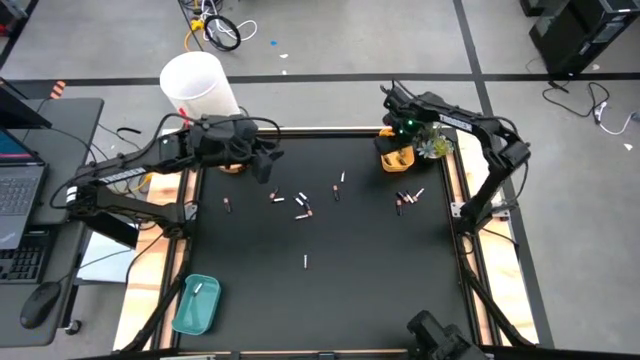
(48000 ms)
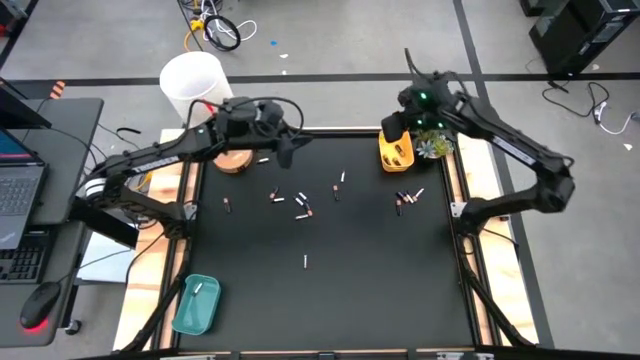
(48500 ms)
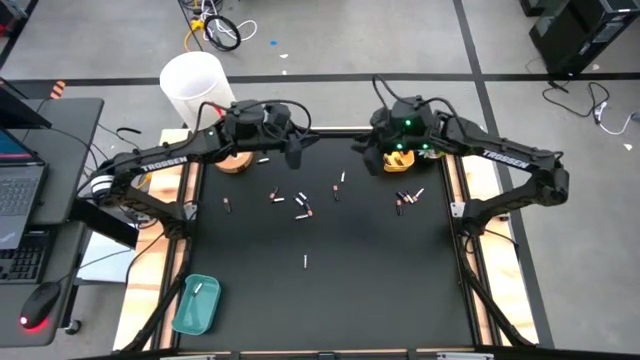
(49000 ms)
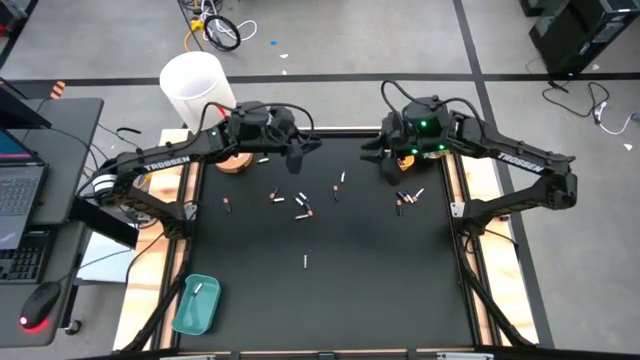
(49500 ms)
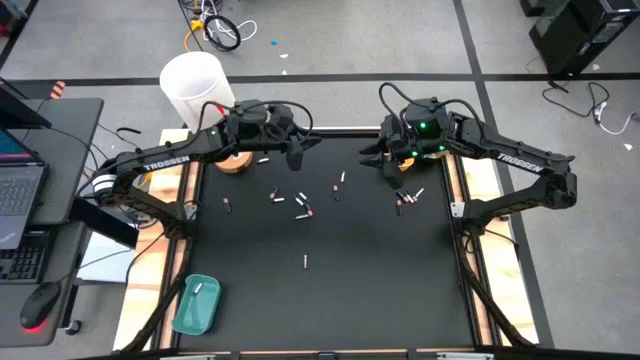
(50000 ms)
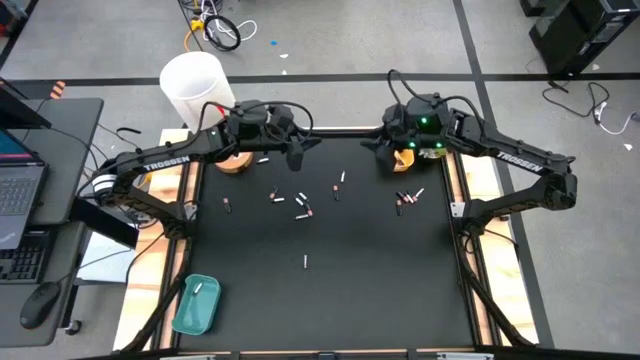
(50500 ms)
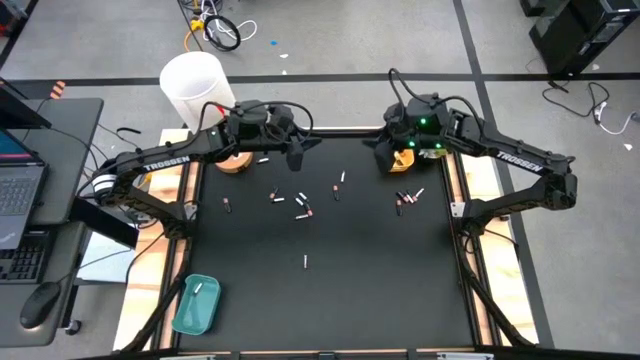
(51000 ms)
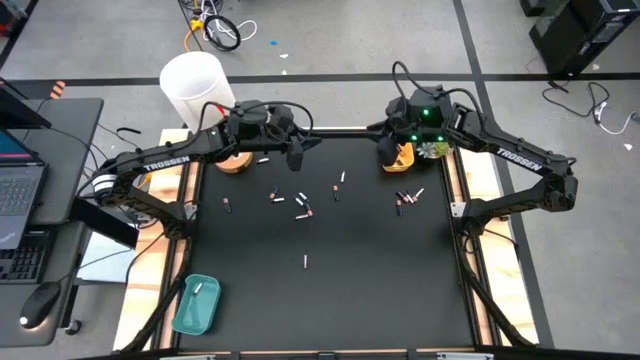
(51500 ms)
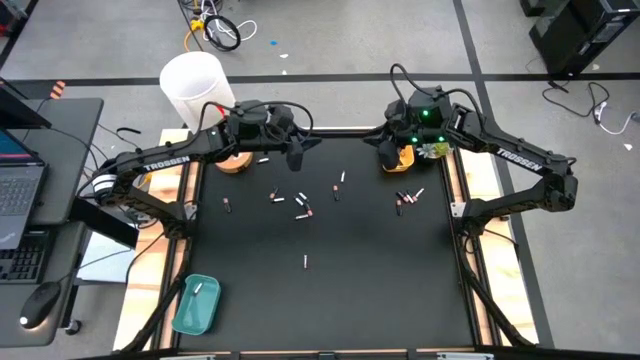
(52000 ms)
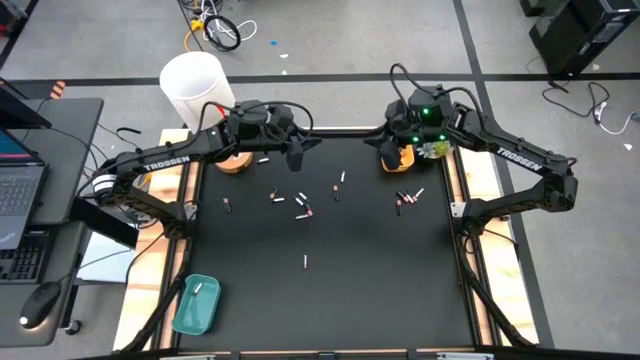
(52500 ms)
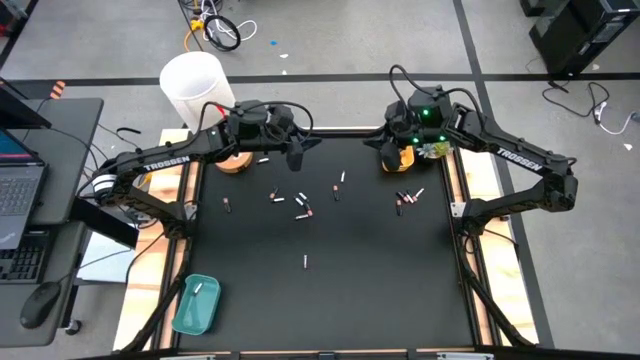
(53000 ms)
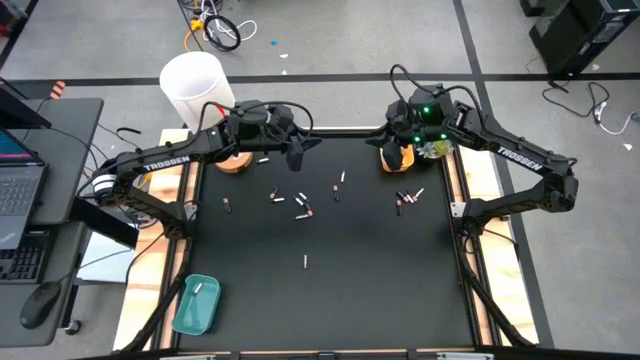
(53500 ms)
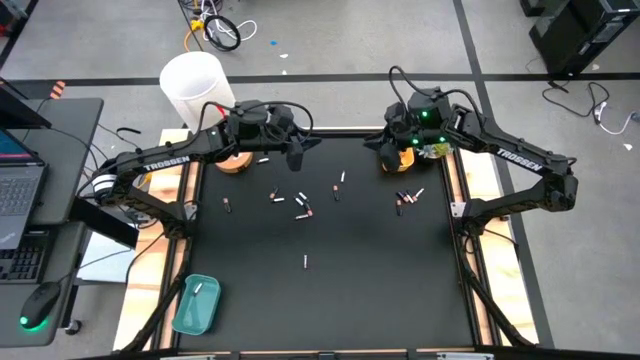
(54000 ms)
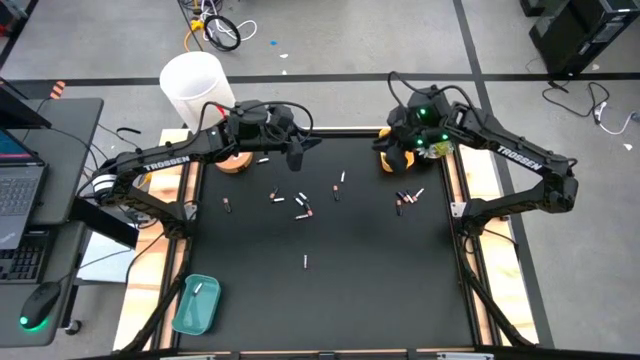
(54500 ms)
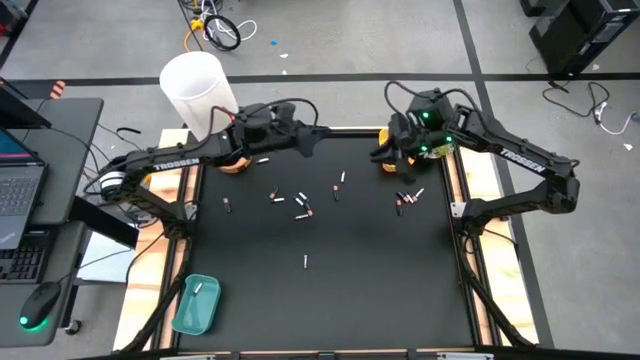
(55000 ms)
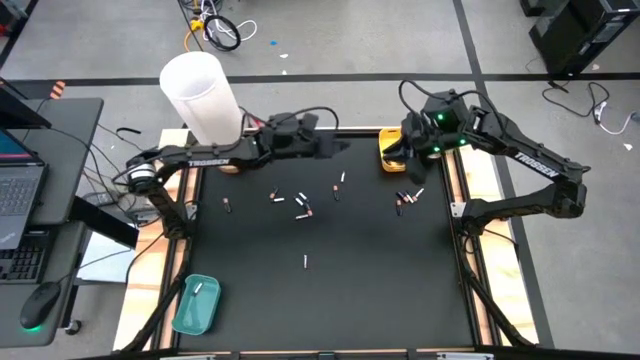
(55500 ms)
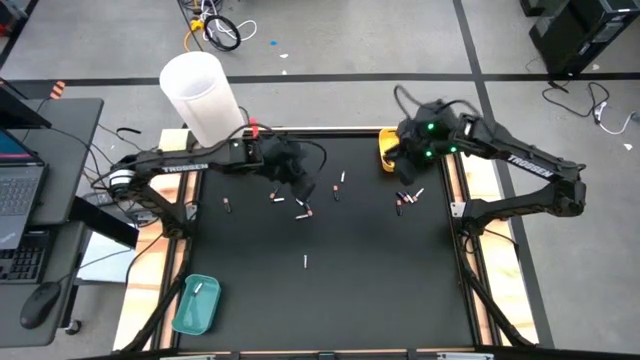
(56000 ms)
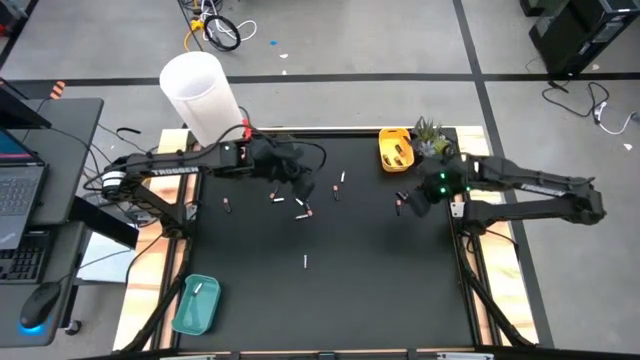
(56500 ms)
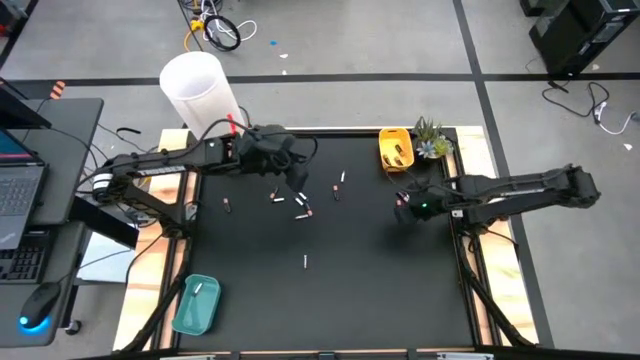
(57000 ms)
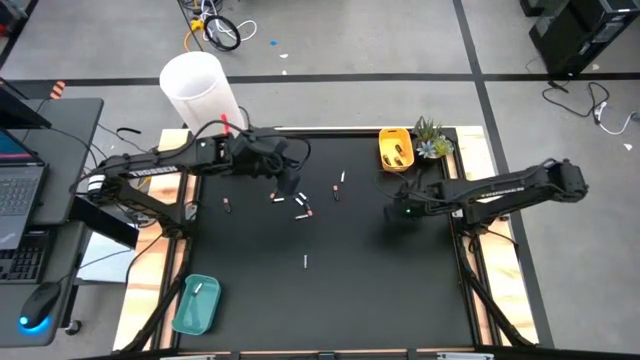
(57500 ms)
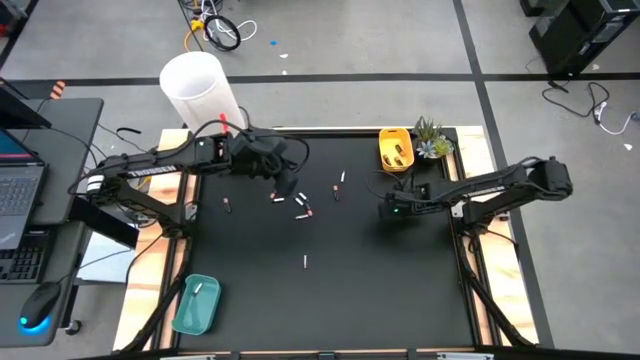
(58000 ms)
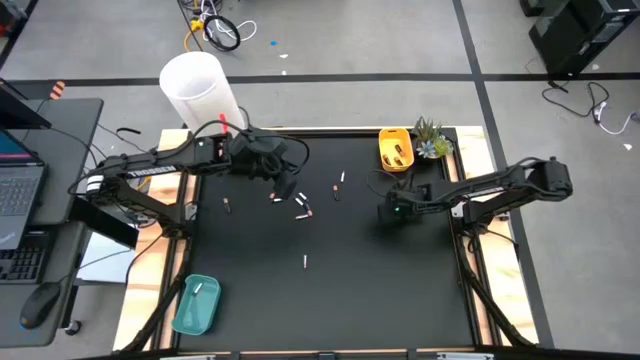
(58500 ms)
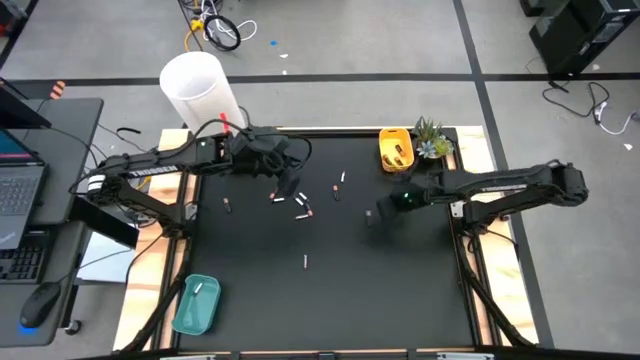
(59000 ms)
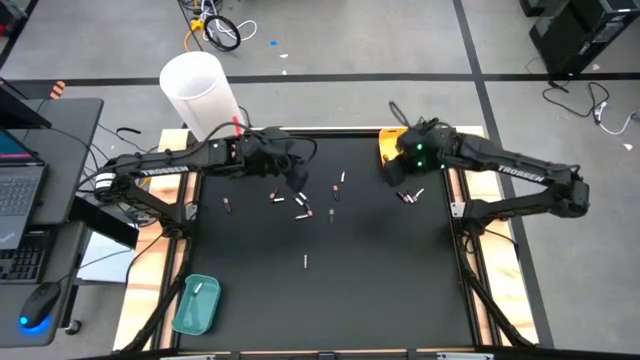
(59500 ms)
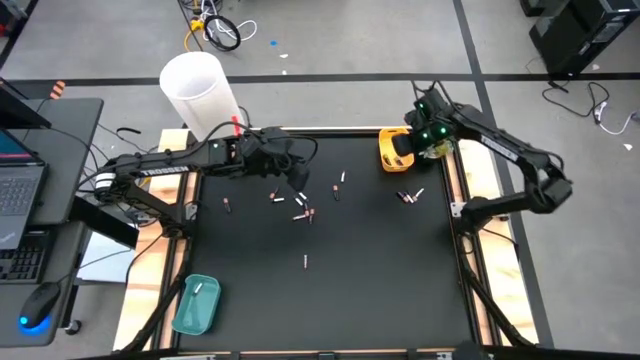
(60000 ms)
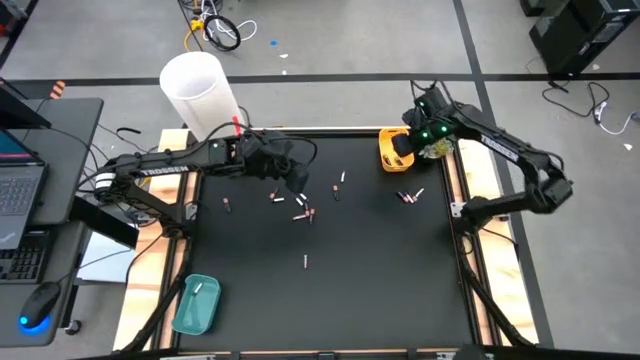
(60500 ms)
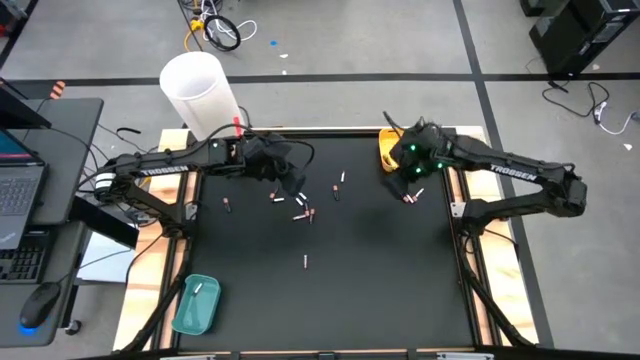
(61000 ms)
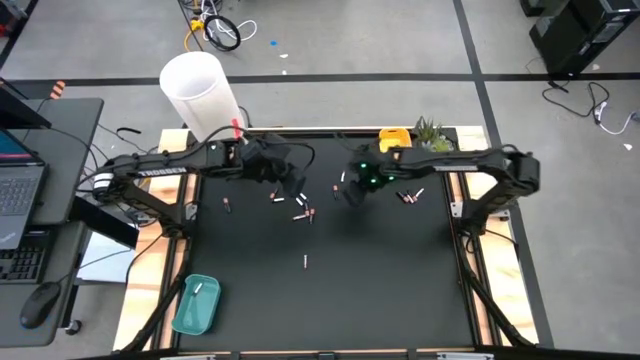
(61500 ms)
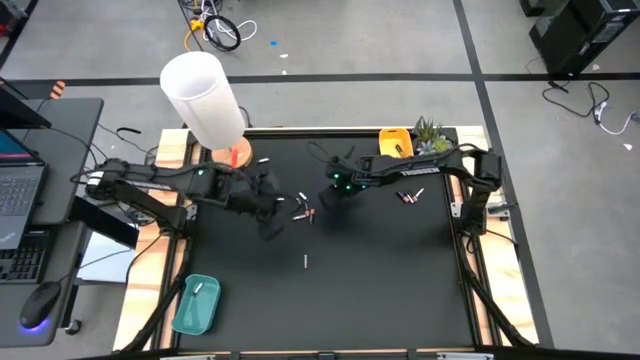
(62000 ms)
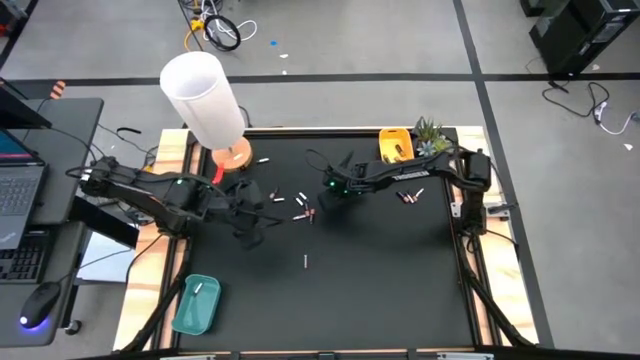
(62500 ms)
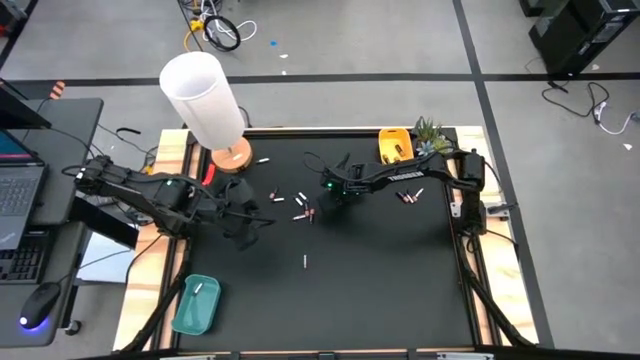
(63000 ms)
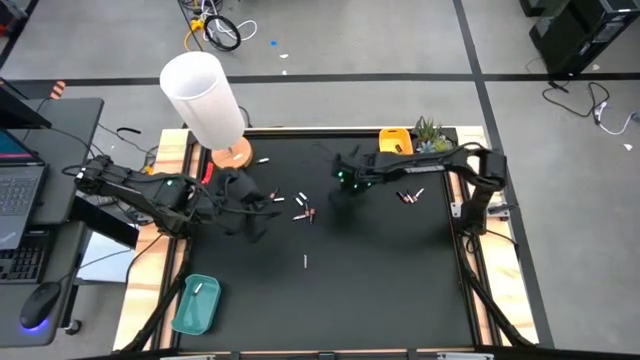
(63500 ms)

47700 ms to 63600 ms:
Task: Sort batteries
Put the black battery into the yellow bin

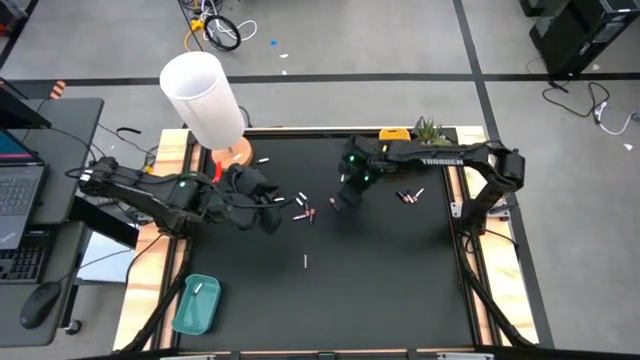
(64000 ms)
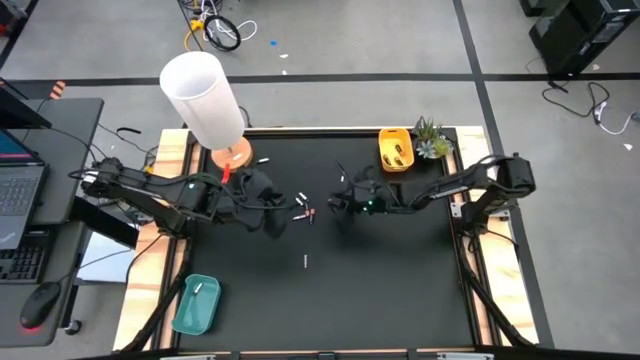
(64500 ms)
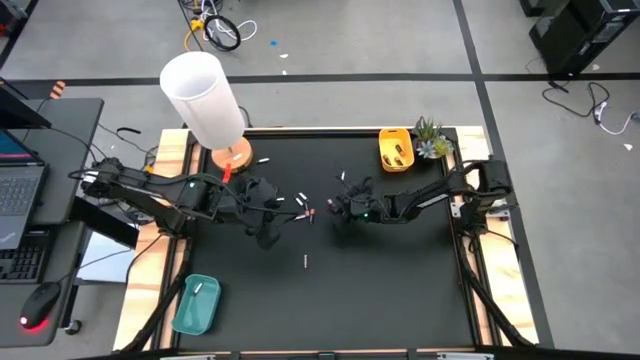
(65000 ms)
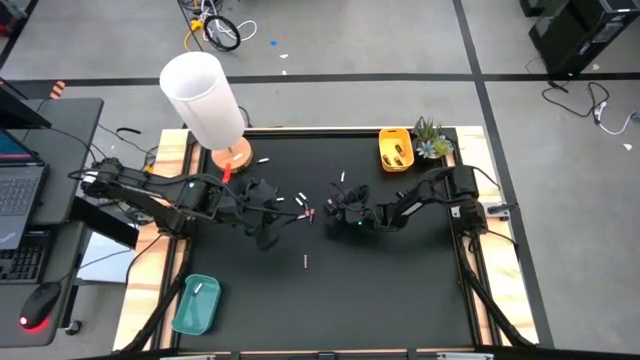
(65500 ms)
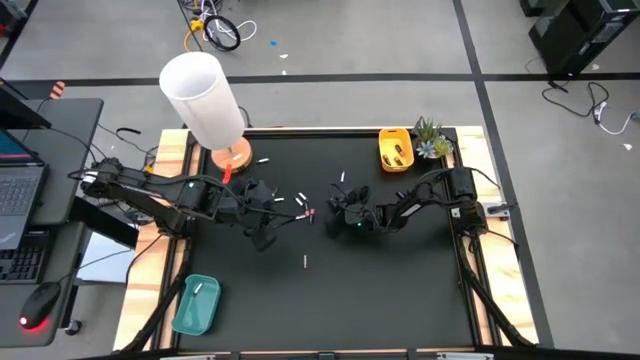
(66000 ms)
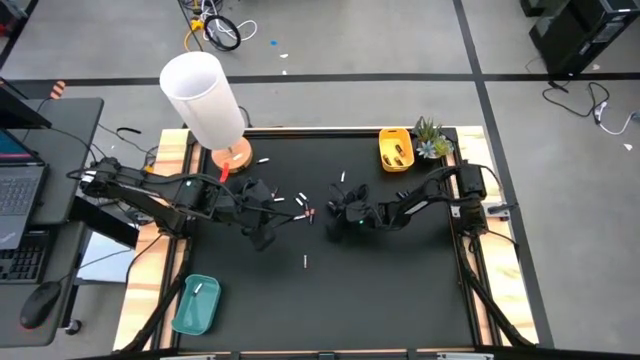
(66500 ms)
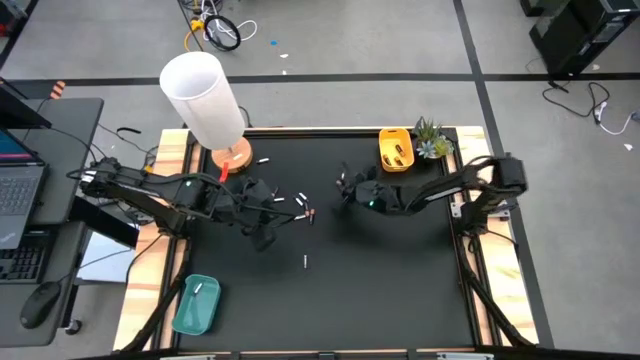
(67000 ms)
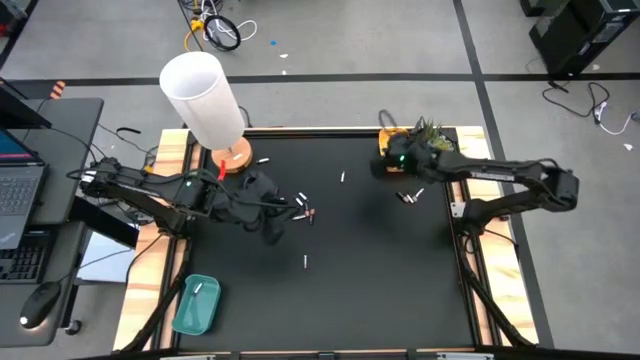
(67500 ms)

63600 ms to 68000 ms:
Put the black battery into the yellow bin

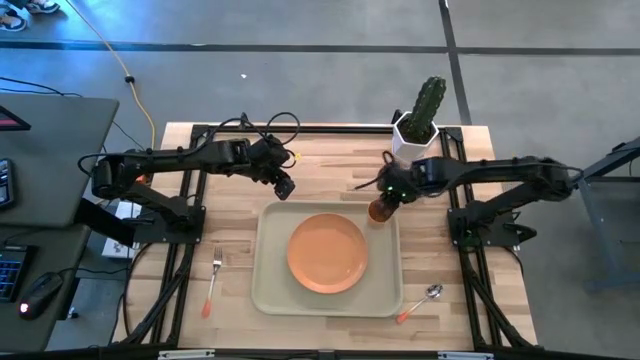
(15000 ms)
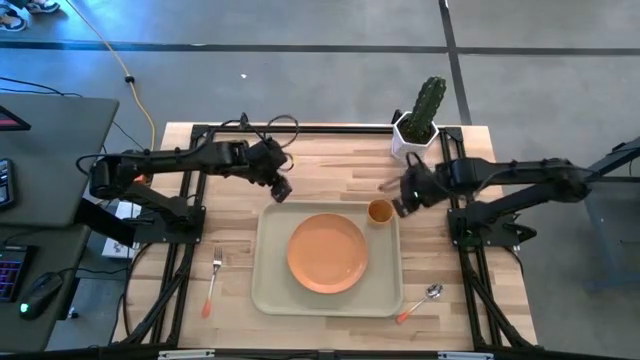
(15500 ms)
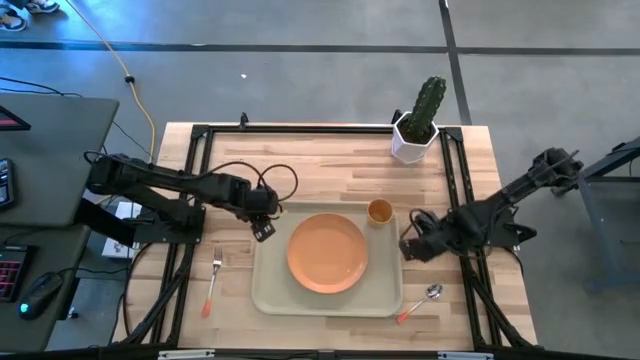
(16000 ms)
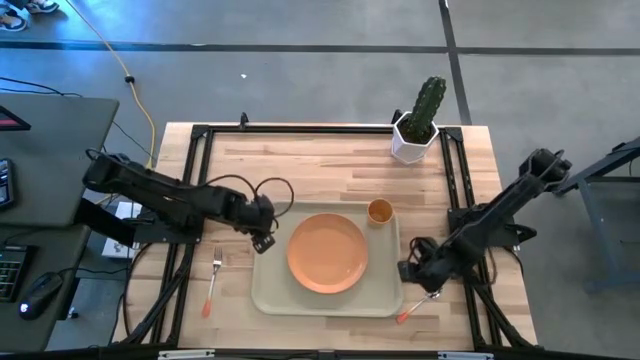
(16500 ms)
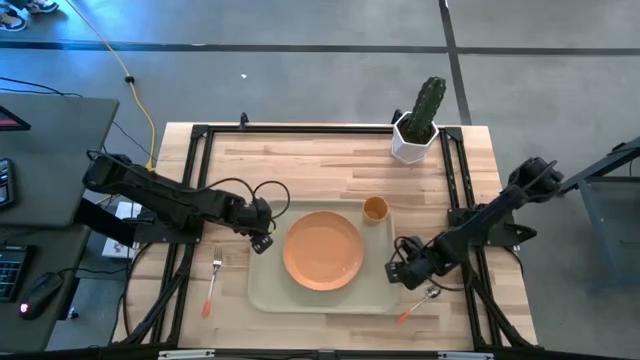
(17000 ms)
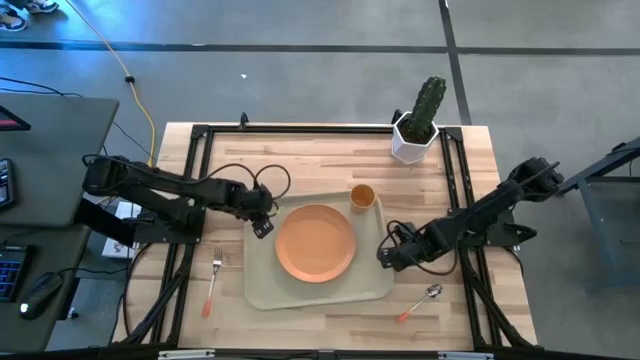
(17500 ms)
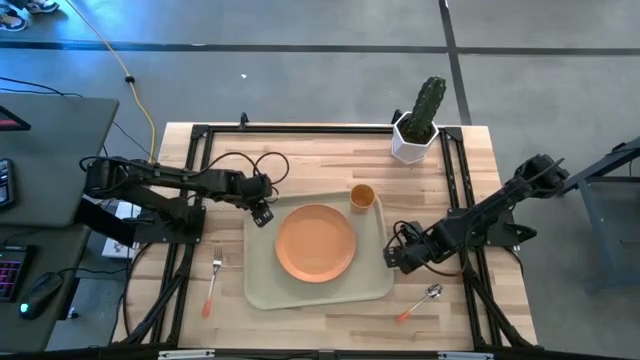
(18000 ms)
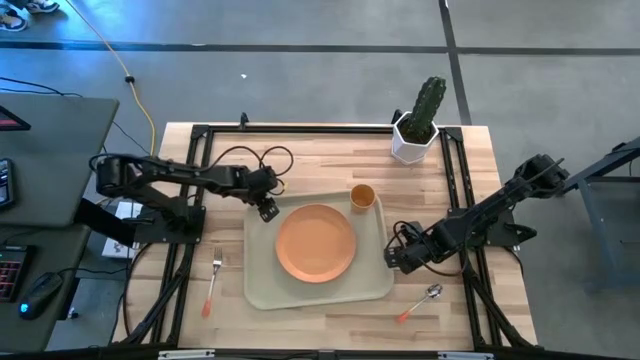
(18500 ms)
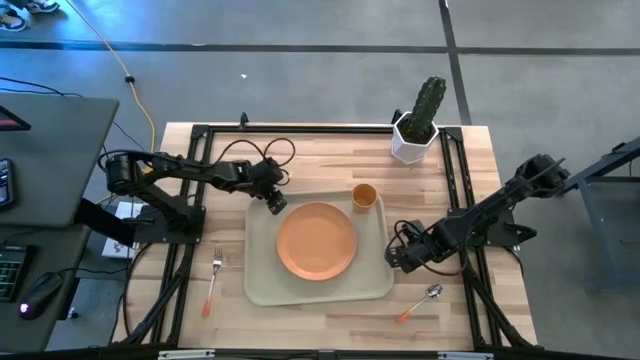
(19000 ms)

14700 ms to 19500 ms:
Task: Pick and place plate/cup/fork/spoon on tray
Adjust the gray tray
